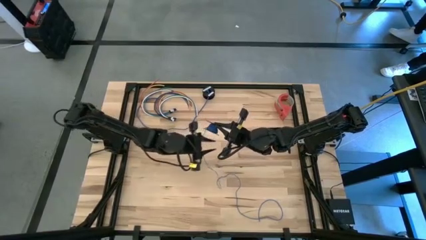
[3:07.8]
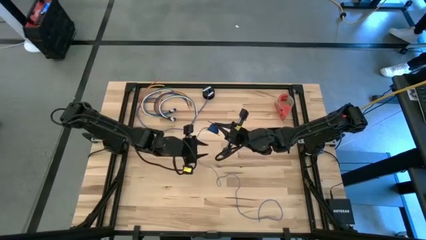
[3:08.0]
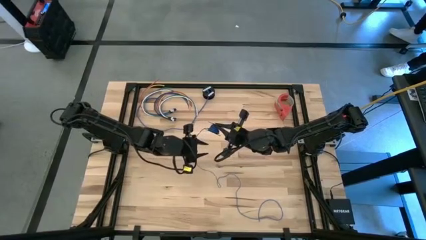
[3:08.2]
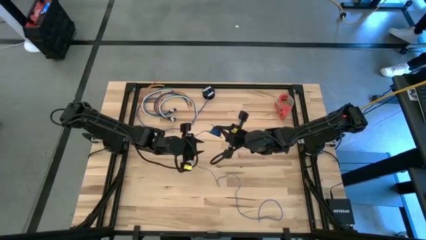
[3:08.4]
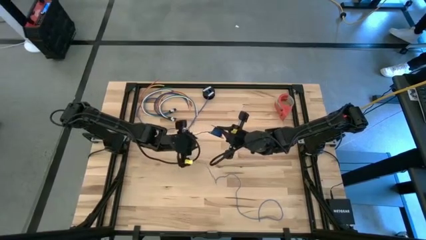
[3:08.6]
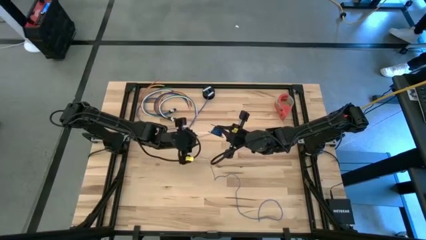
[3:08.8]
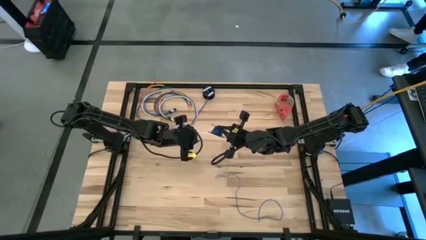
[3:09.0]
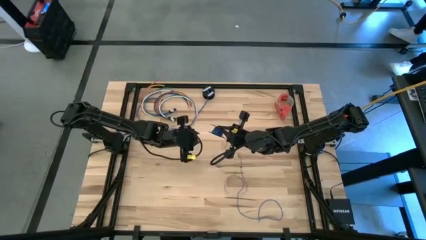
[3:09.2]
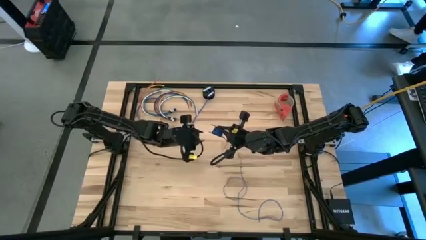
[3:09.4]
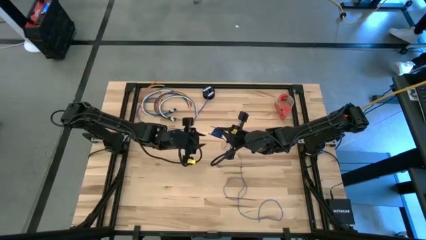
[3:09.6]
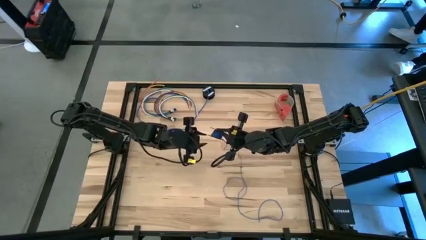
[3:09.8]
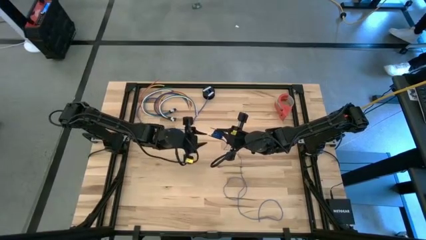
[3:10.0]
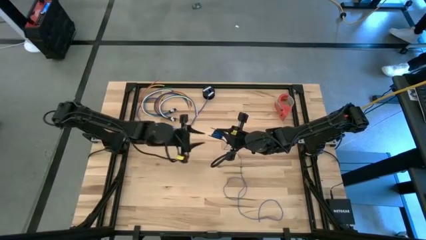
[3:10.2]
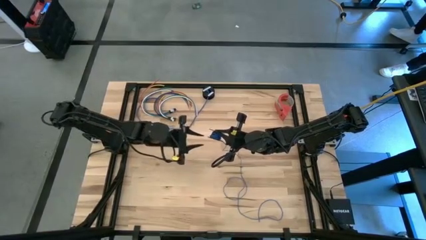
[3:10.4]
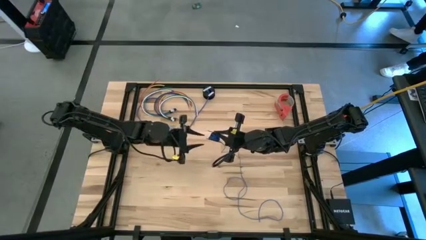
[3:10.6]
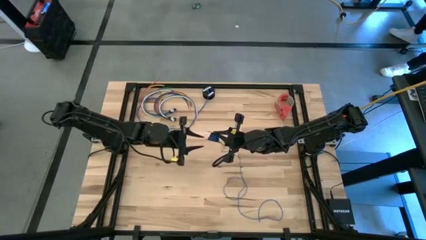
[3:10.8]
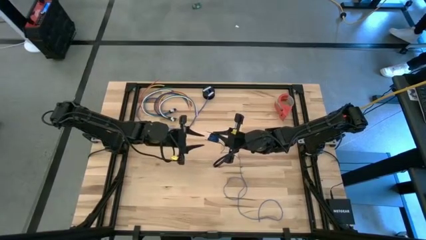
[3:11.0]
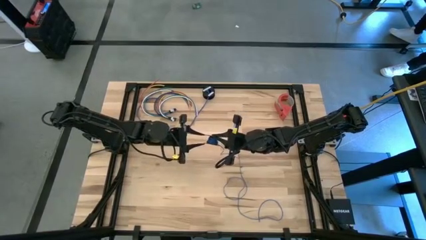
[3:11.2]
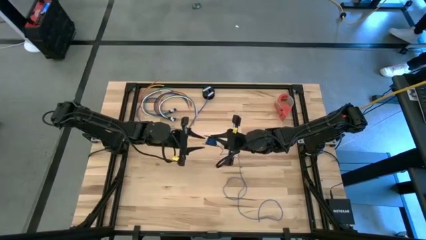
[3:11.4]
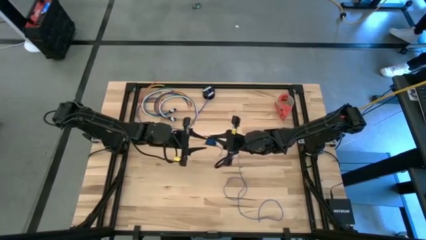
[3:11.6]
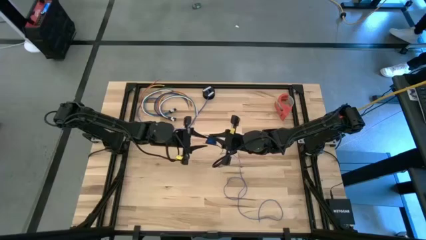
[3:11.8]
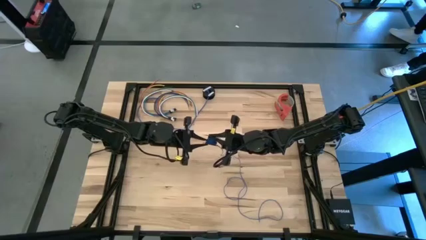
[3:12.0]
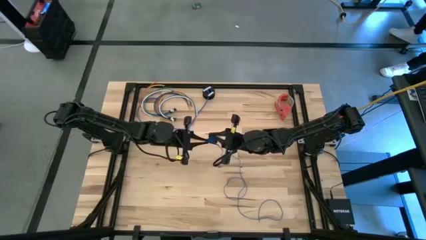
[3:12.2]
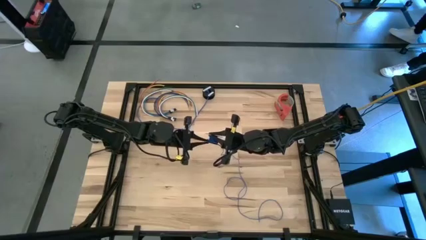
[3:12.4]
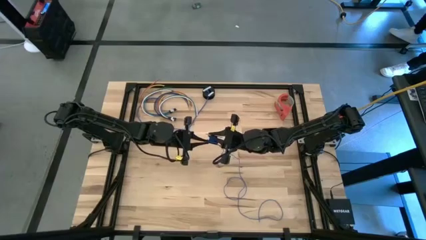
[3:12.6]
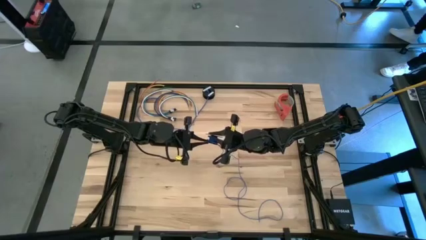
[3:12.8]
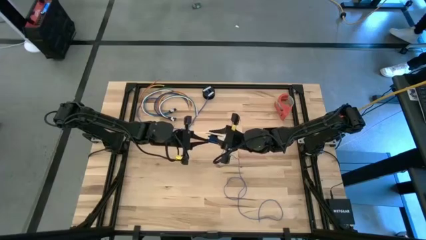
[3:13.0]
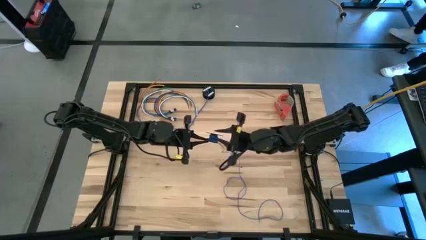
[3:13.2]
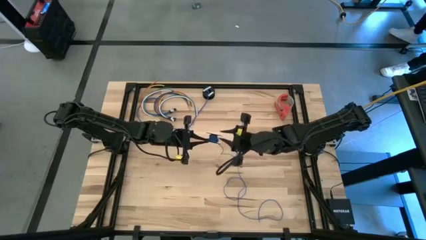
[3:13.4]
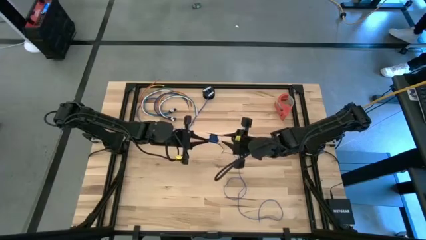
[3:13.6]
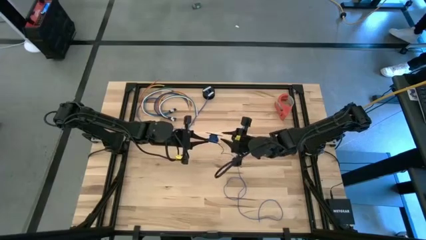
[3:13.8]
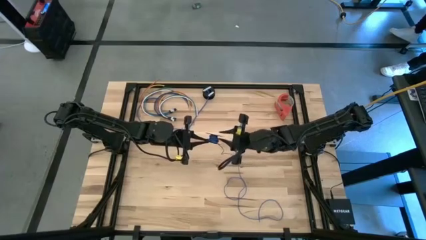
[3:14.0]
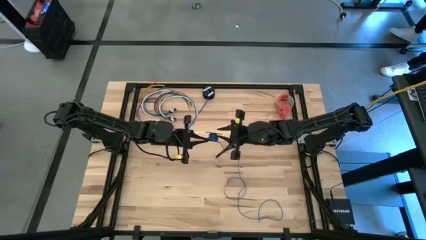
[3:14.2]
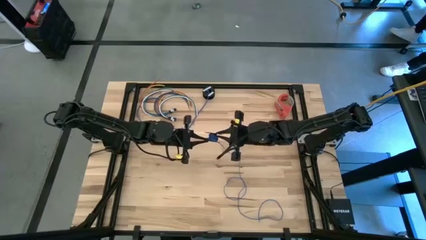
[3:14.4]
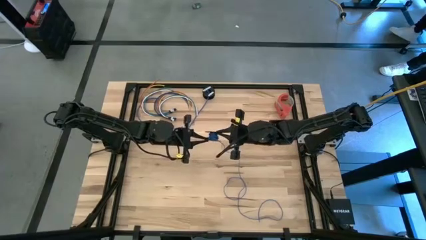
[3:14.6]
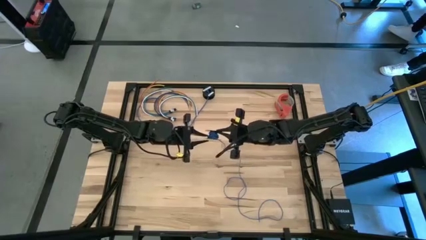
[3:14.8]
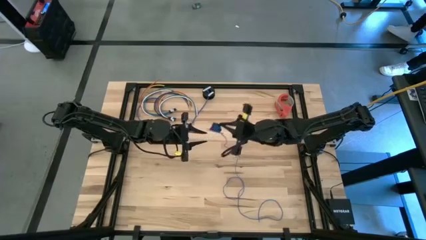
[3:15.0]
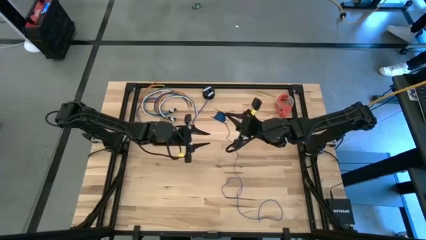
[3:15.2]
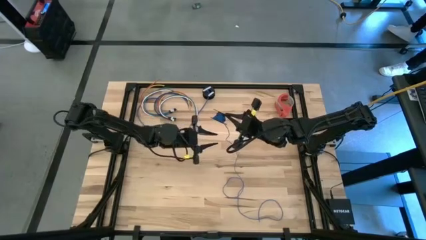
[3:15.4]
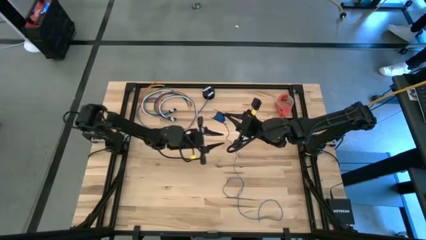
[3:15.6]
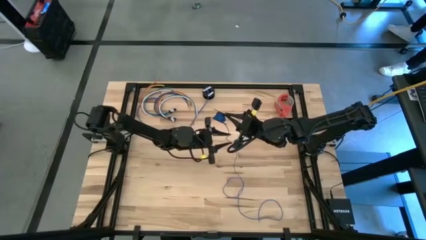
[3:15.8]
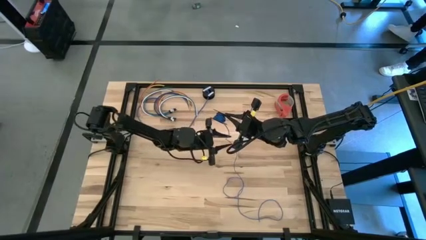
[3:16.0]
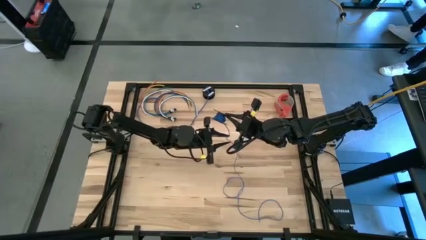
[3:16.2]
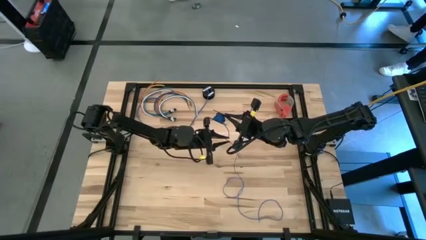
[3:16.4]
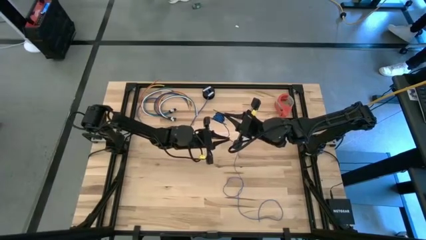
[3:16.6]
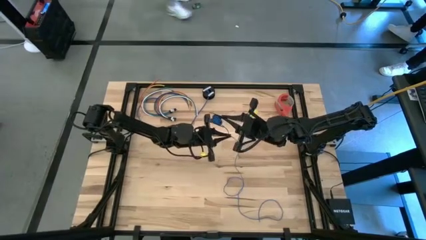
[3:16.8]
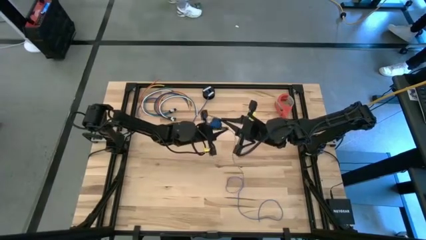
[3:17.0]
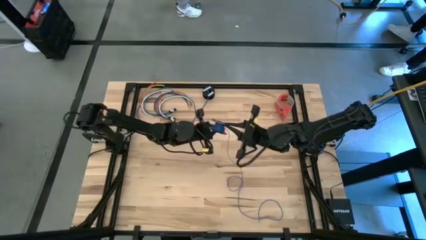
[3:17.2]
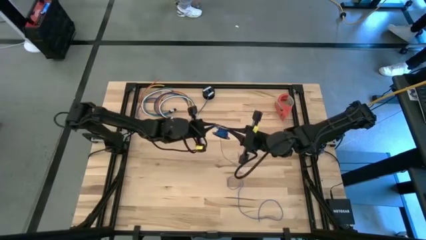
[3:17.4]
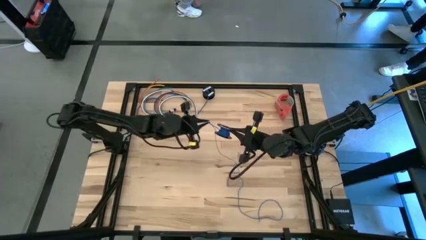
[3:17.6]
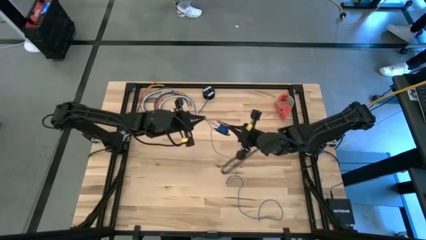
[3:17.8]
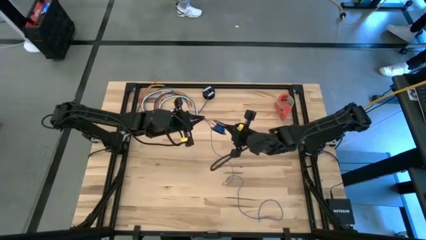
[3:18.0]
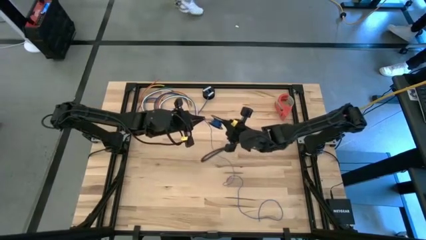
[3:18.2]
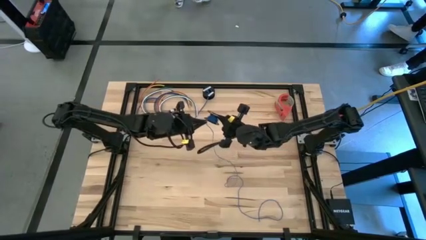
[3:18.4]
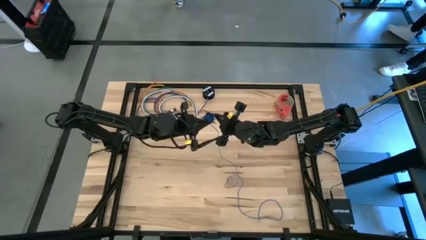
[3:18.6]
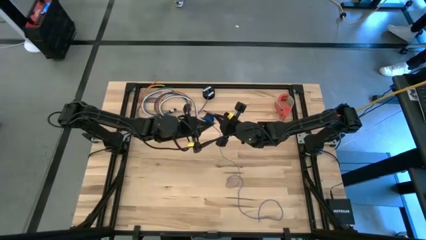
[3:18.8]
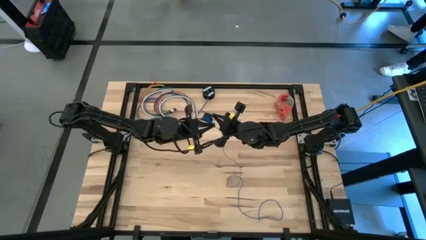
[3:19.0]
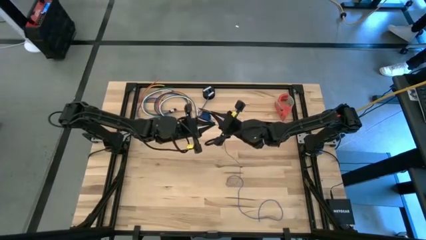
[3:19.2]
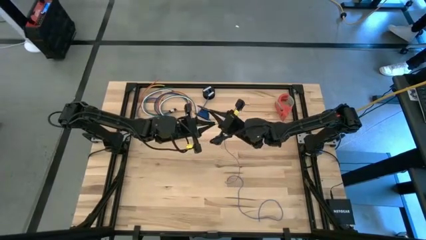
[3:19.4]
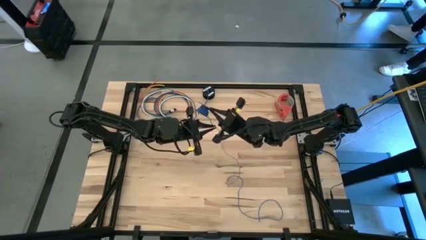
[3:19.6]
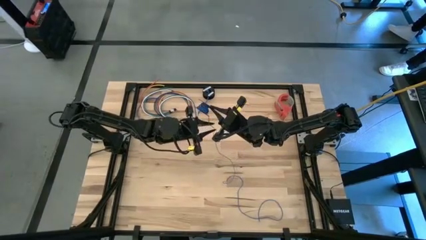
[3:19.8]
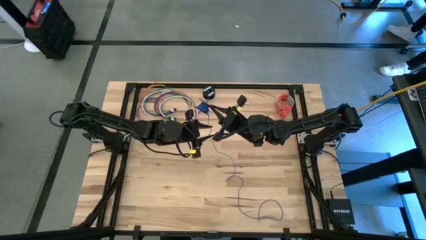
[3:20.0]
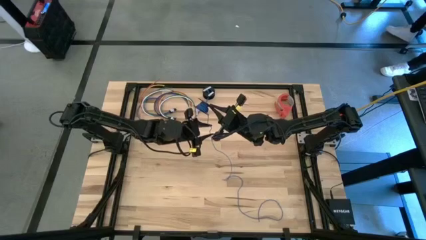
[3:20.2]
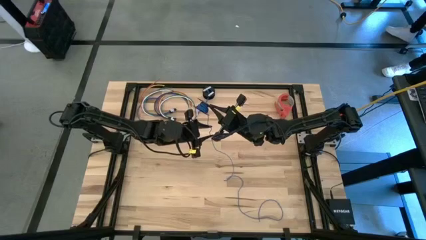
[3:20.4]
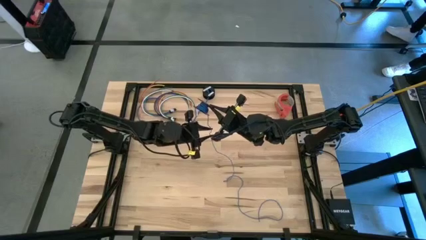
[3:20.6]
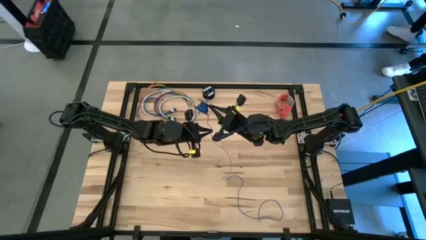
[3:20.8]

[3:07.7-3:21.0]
Task: Coil cords
Coil the blue wire onto the black spool

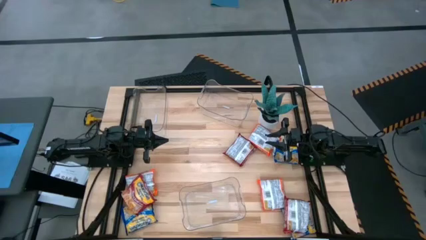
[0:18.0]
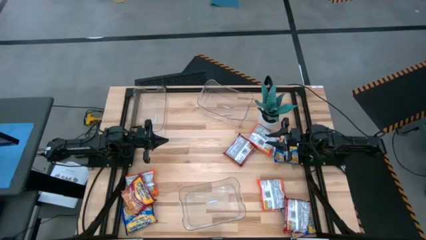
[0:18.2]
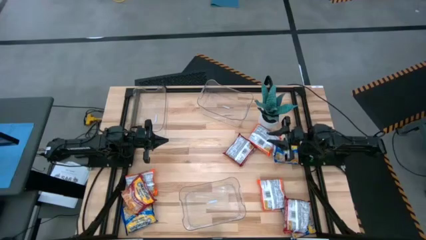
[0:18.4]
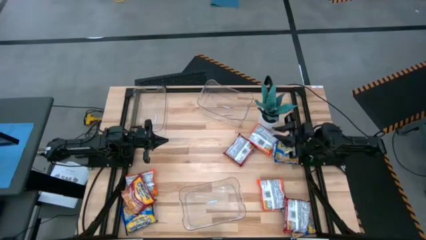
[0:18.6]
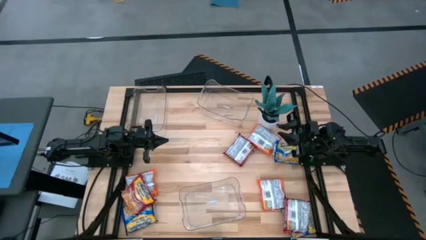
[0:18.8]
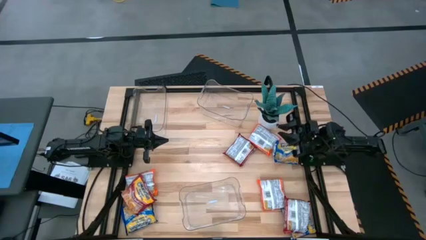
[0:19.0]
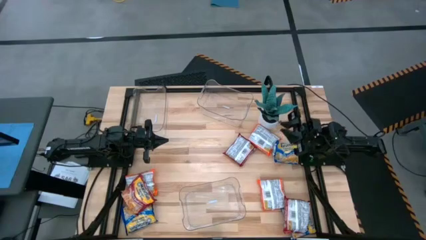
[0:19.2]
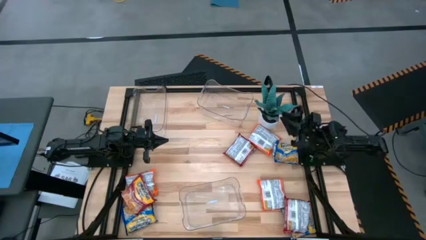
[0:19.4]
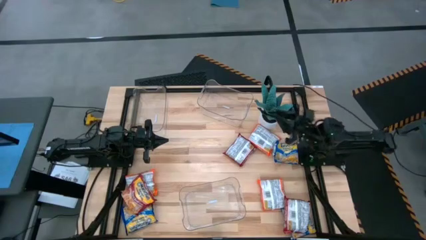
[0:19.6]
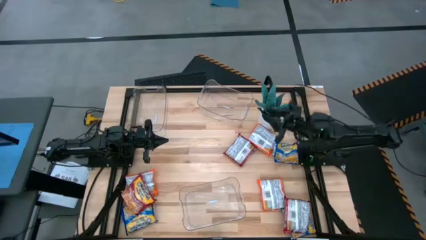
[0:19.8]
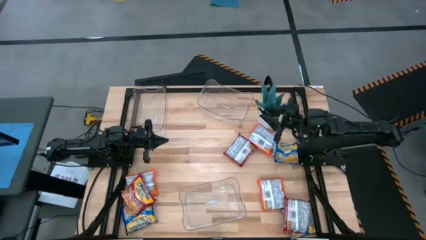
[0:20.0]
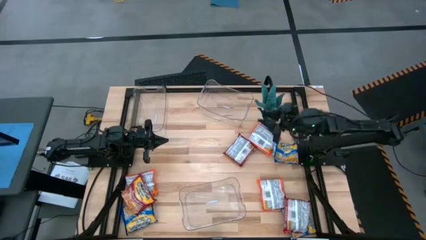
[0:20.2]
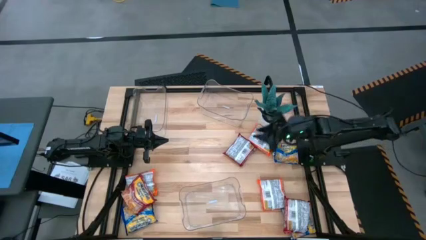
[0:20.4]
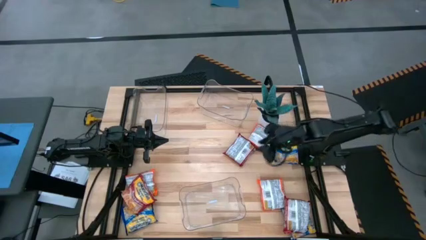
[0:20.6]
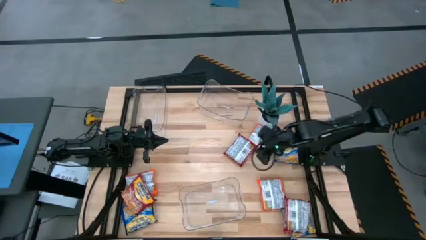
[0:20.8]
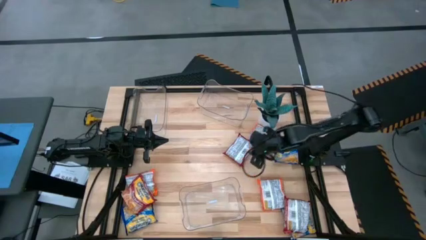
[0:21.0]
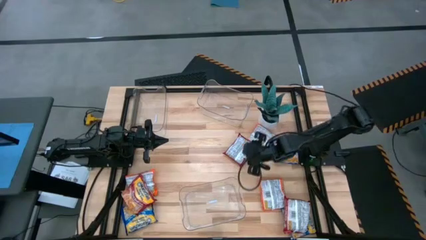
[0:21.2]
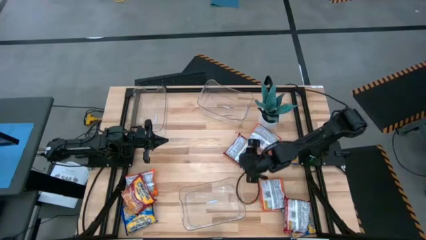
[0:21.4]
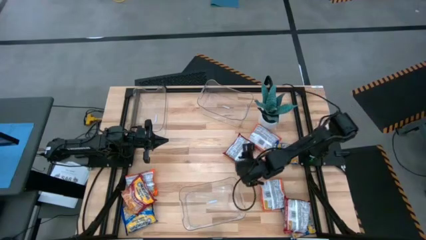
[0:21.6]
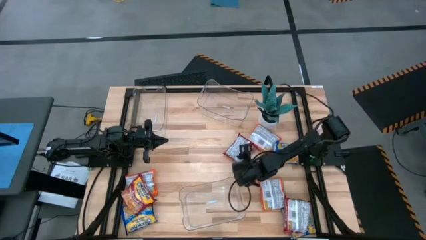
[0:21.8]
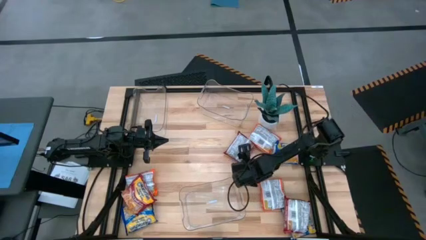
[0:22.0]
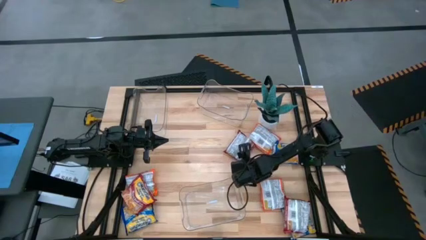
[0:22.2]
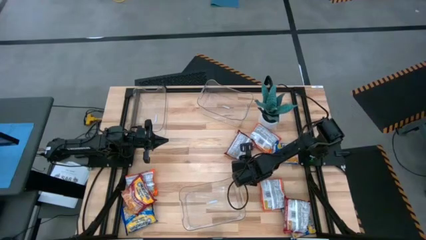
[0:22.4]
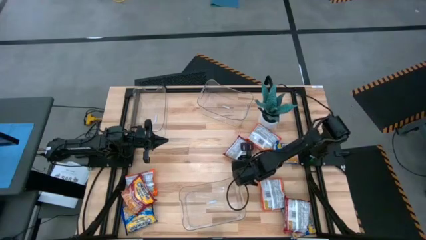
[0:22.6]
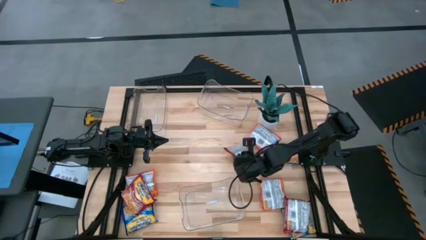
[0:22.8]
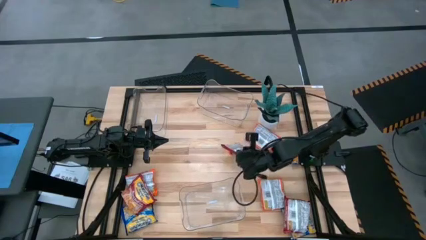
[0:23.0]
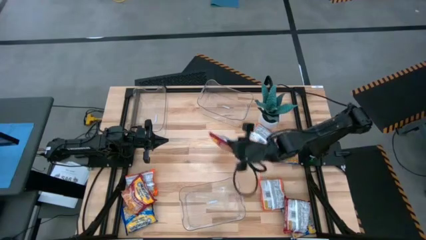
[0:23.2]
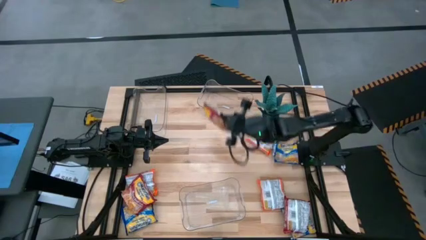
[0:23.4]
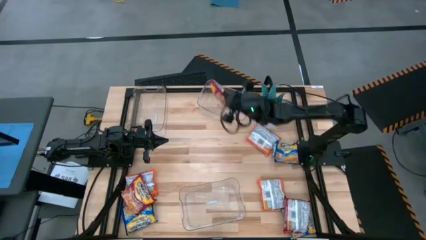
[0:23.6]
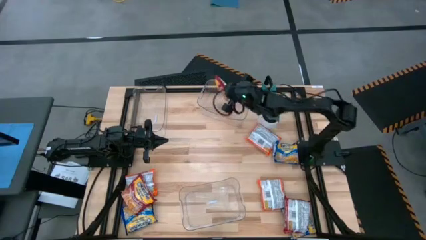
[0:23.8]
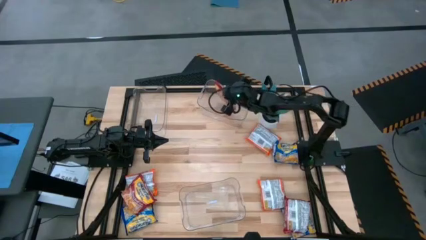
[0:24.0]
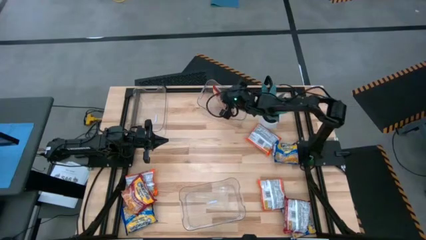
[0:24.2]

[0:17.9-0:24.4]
Task: Sort Maruchan noodles
Put the top red noodle pack into the top right transparent bin
